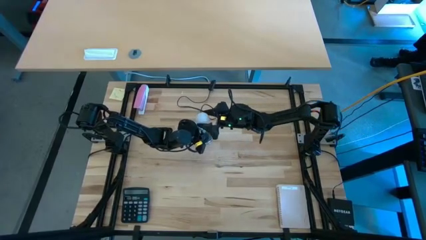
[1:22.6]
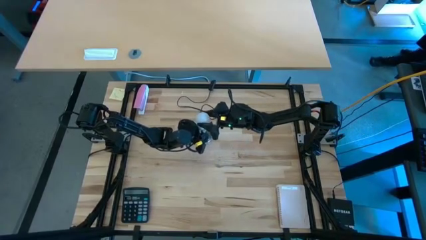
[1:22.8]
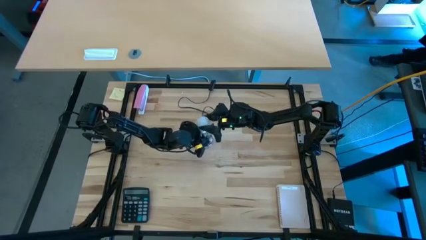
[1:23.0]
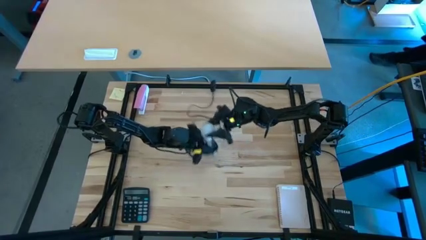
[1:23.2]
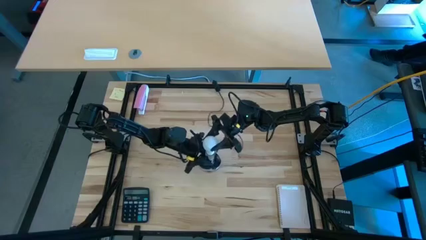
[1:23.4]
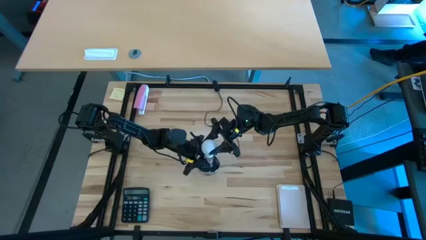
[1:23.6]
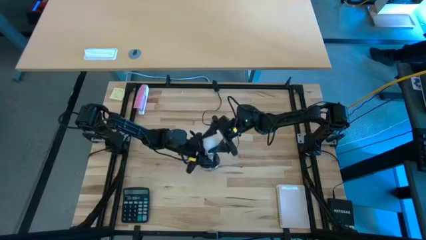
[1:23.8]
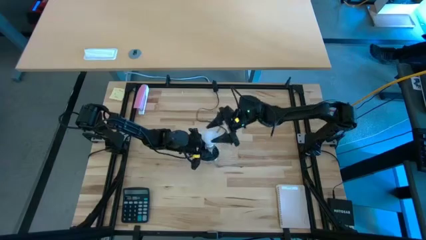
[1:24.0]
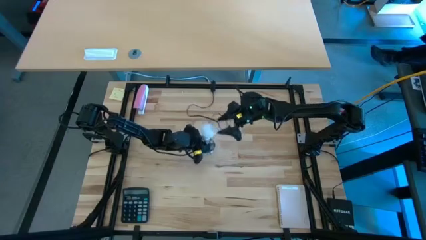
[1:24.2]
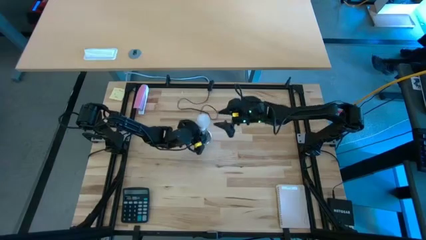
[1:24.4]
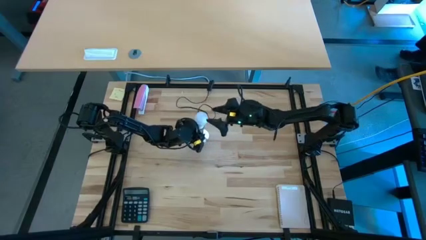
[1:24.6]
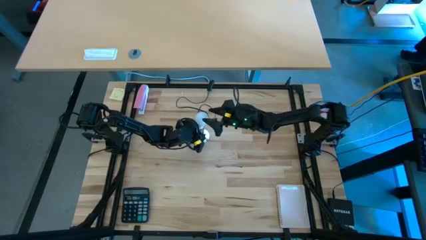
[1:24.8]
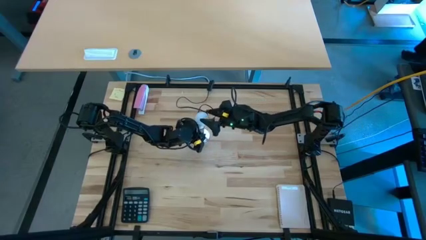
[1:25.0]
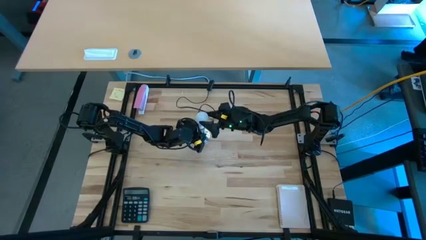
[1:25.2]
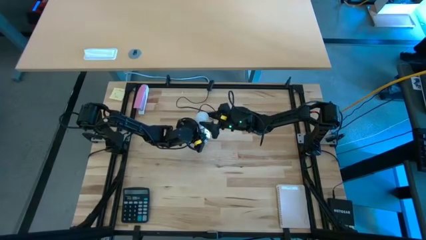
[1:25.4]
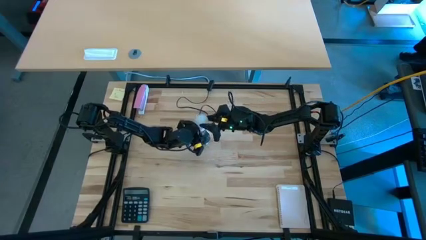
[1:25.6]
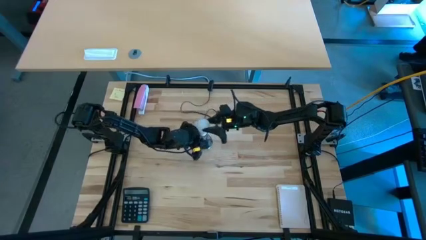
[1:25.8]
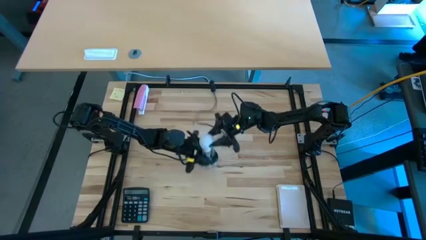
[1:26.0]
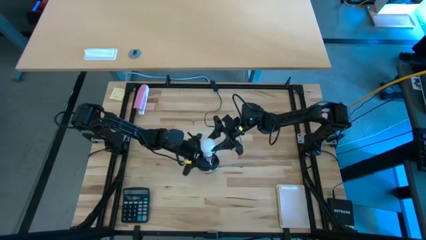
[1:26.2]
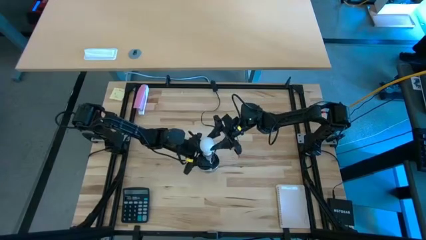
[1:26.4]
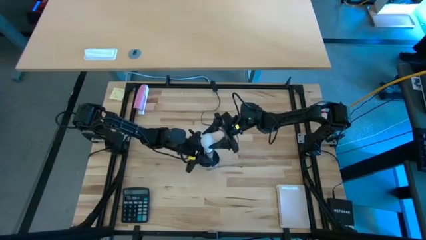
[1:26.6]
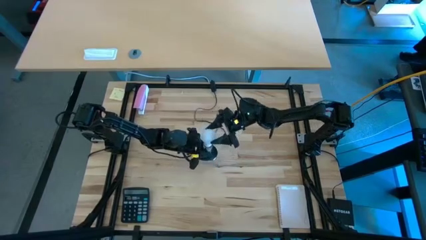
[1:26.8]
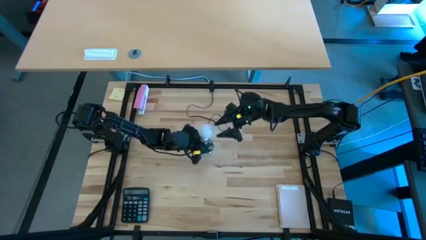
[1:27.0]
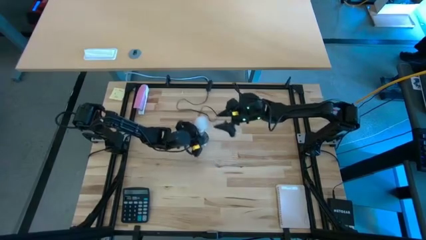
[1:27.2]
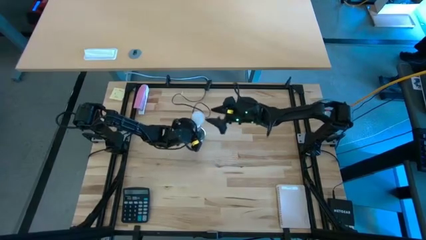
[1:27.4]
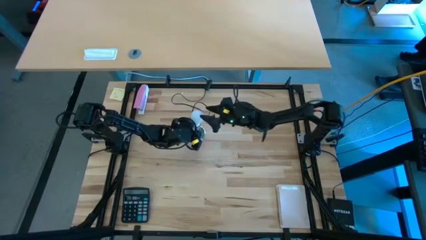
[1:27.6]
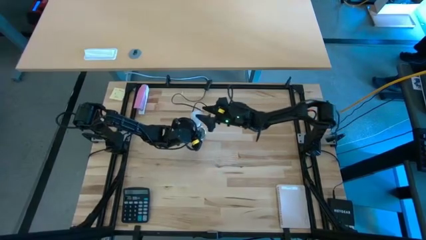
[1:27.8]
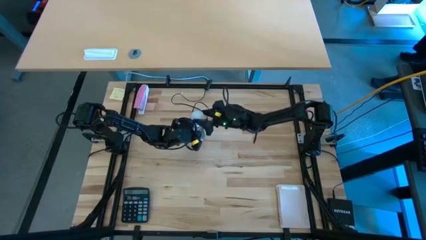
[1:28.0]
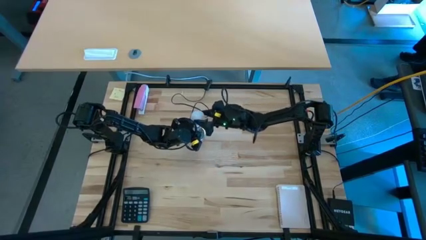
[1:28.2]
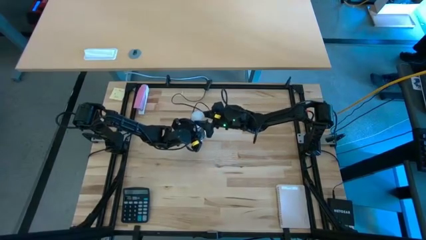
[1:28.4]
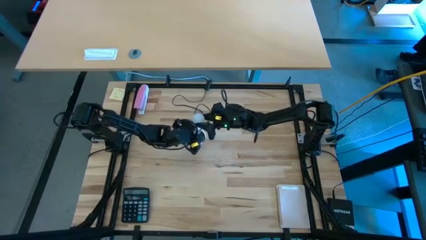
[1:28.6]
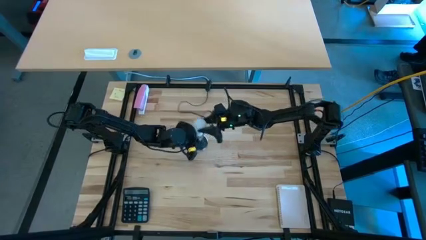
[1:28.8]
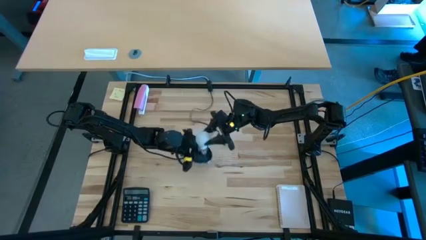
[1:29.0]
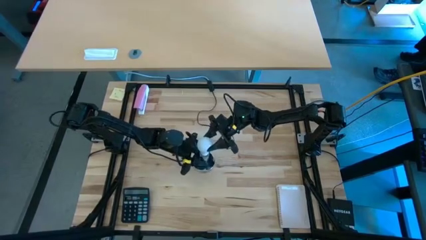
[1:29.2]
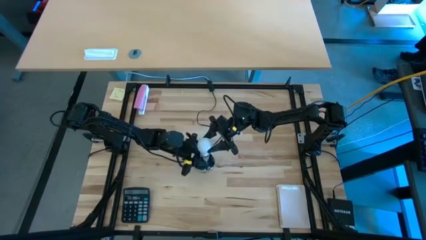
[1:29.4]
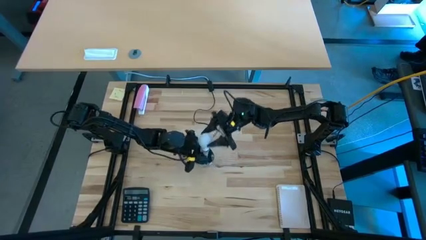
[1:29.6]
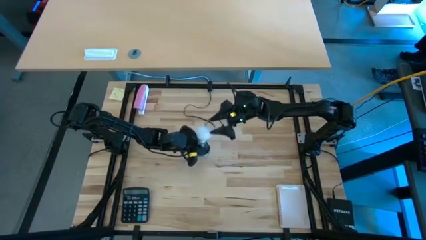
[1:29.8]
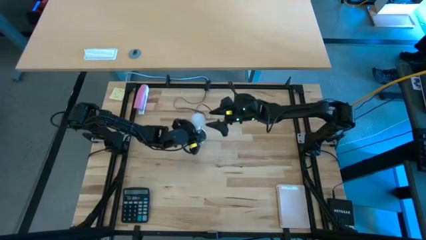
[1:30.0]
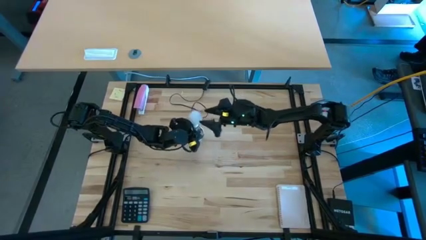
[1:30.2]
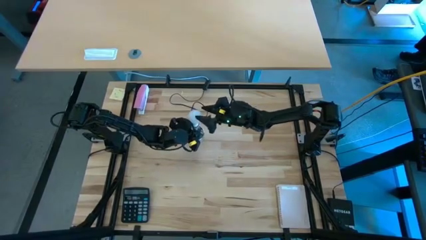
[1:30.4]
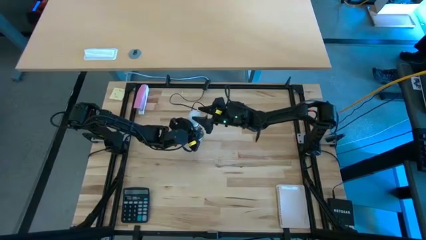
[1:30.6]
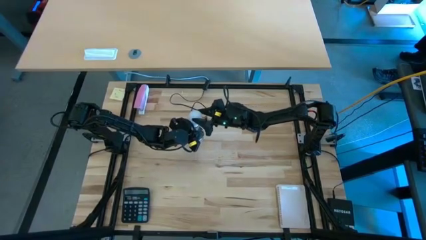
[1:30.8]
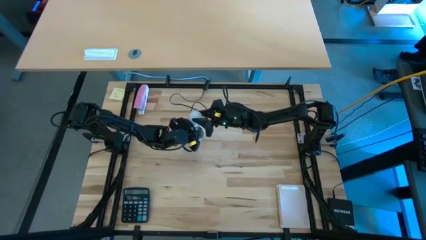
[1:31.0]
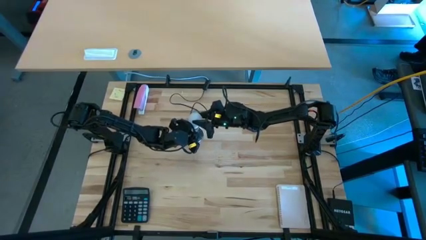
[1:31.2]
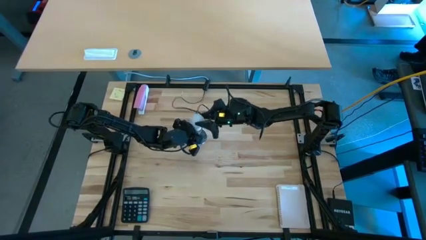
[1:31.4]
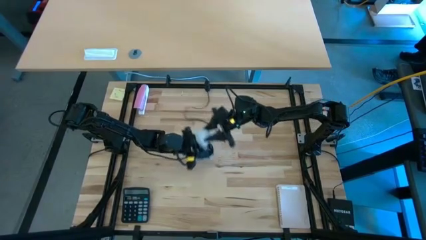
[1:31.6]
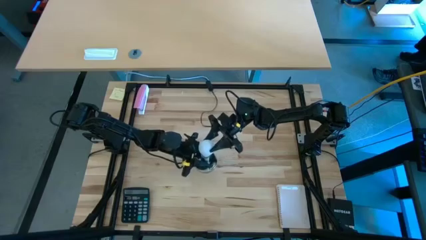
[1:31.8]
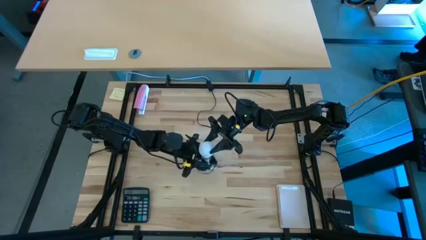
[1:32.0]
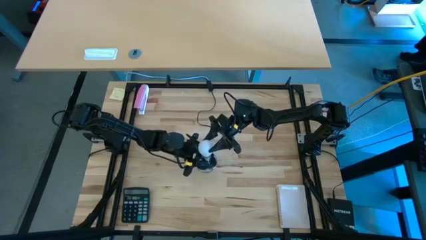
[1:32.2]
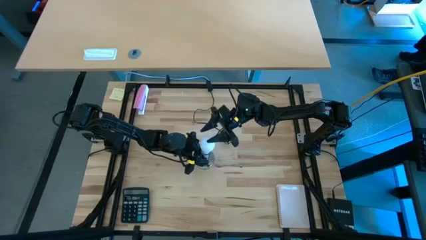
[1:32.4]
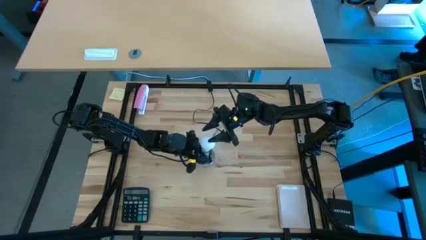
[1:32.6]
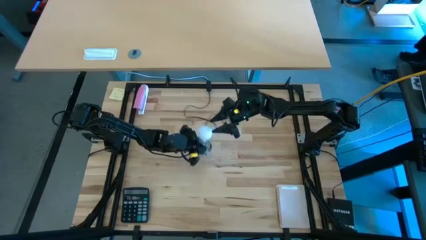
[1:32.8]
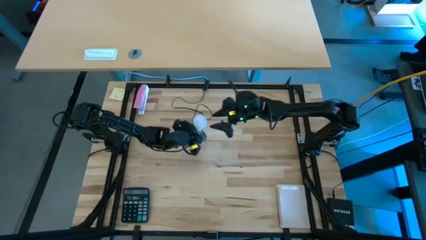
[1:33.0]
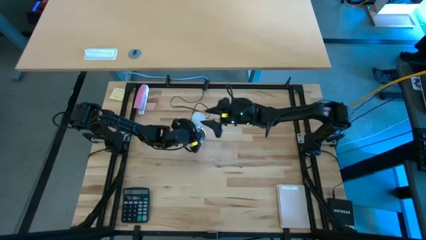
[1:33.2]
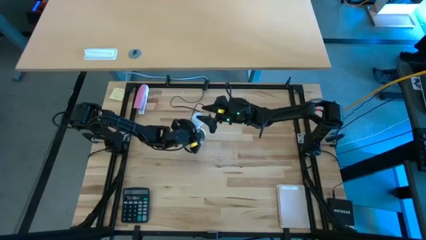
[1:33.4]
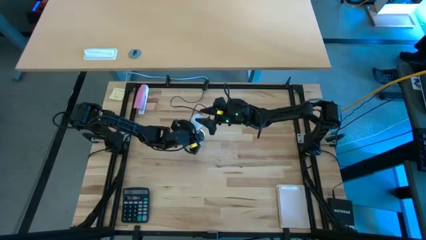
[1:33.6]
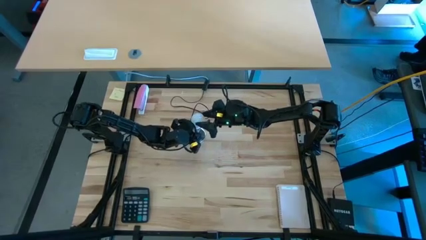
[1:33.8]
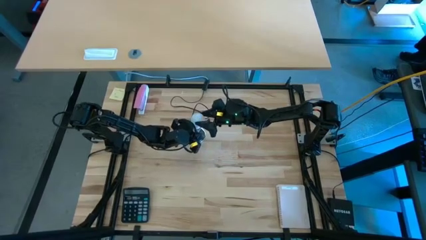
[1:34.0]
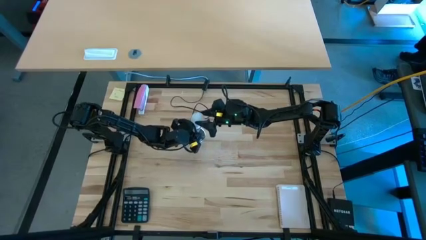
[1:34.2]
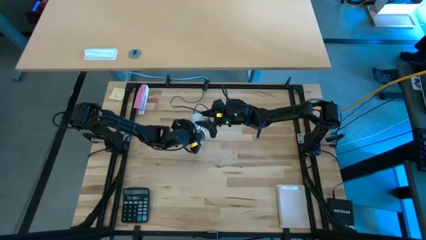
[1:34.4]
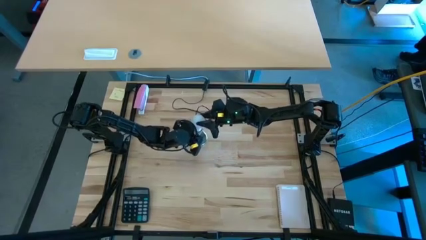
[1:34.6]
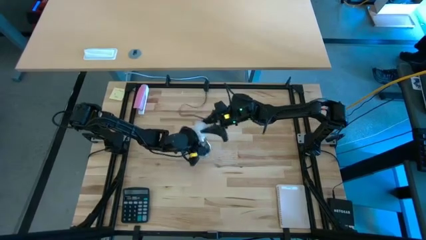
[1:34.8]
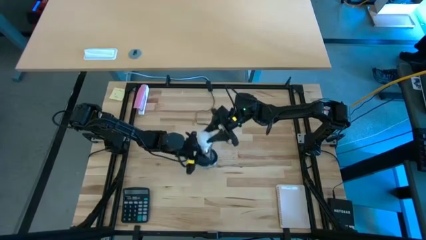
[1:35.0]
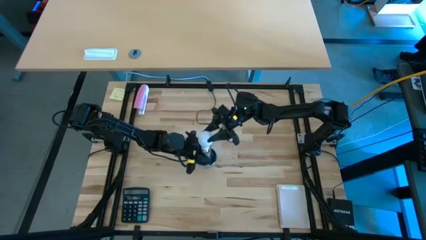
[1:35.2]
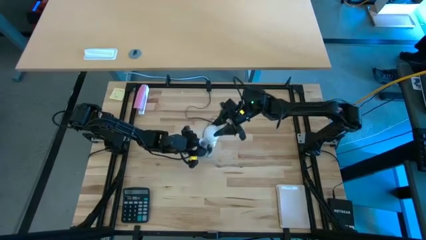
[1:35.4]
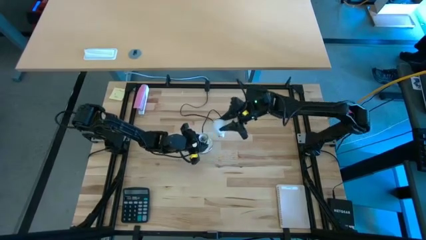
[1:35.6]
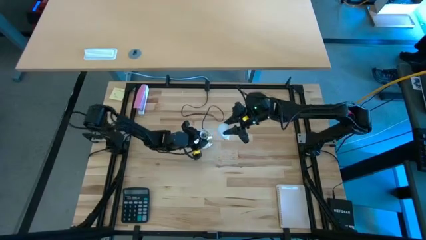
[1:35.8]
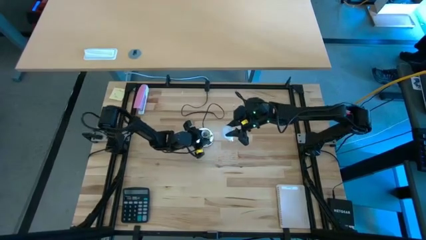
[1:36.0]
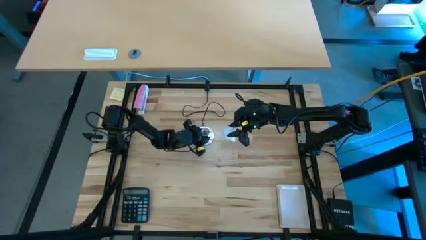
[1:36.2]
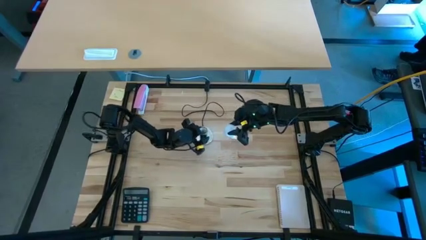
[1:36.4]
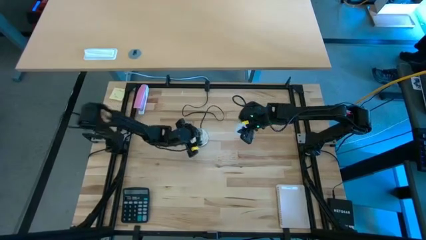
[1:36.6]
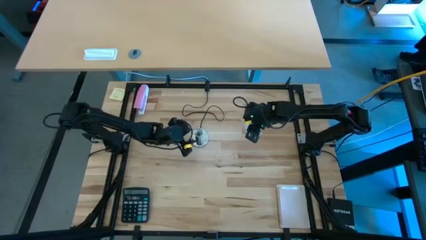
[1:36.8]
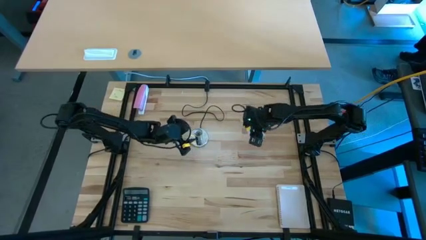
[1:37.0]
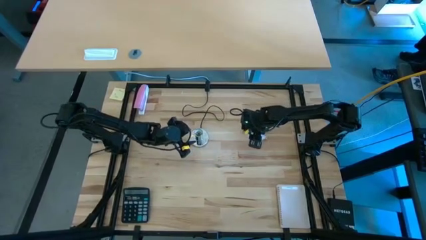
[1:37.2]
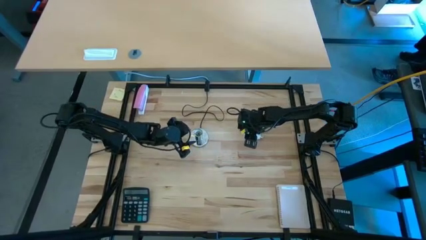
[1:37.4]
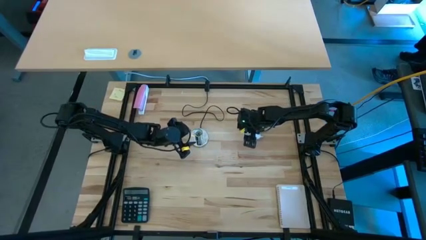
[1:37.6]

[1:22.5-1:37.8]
Task: Screw lightbulb
Remove the lightbulb from the lamp
